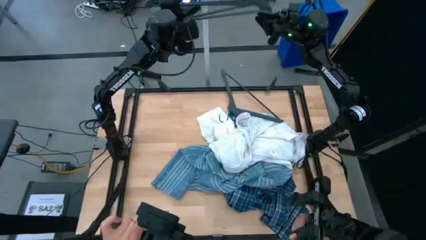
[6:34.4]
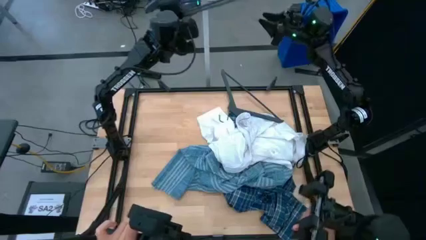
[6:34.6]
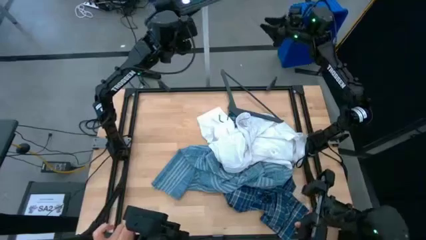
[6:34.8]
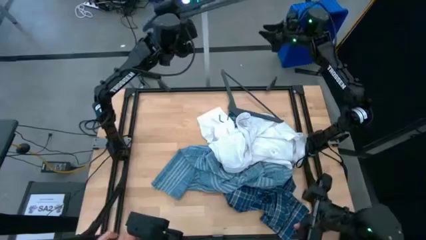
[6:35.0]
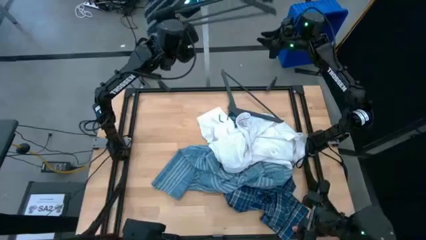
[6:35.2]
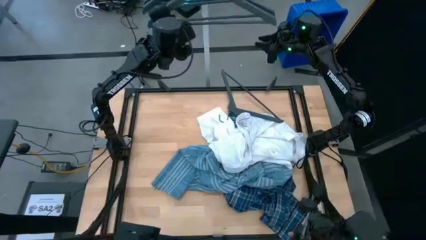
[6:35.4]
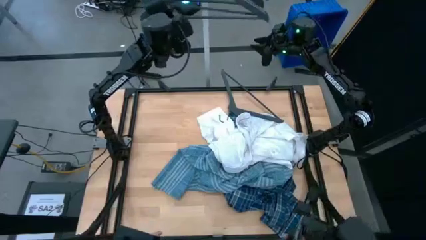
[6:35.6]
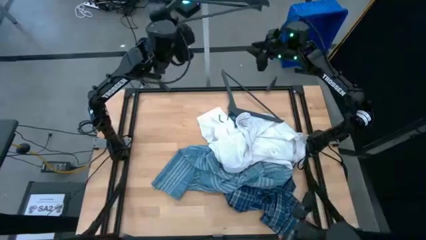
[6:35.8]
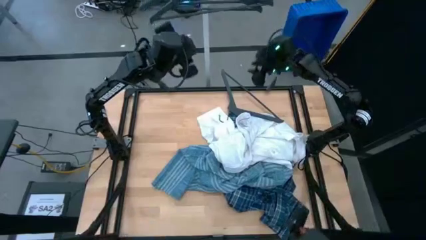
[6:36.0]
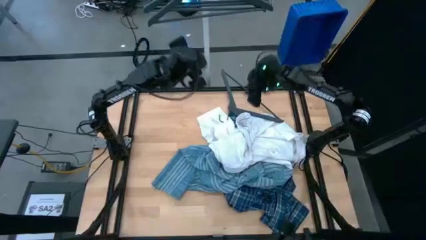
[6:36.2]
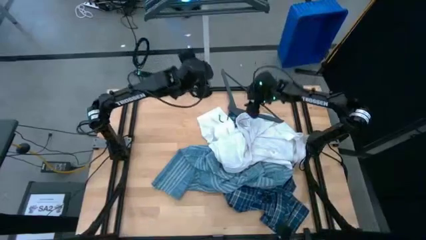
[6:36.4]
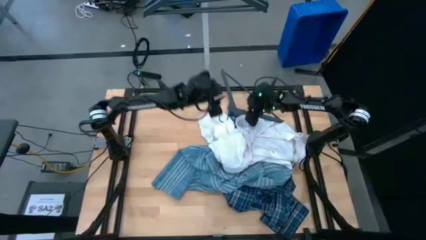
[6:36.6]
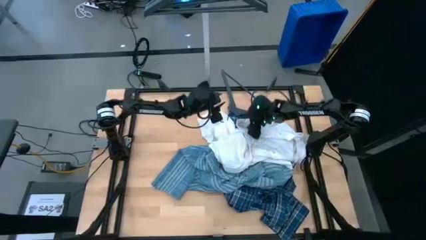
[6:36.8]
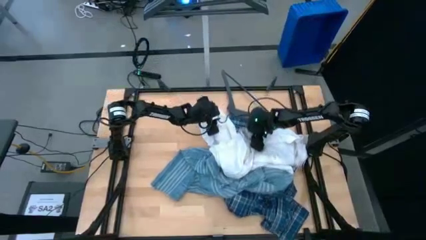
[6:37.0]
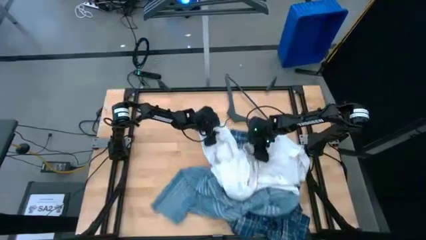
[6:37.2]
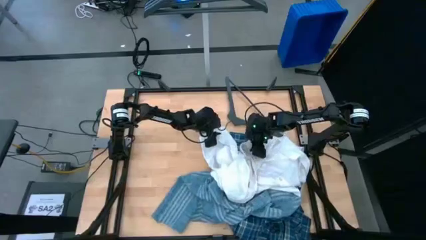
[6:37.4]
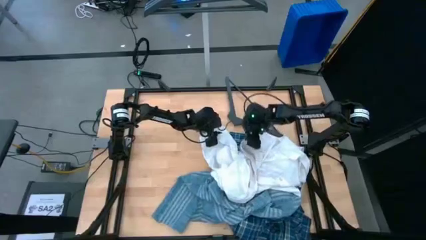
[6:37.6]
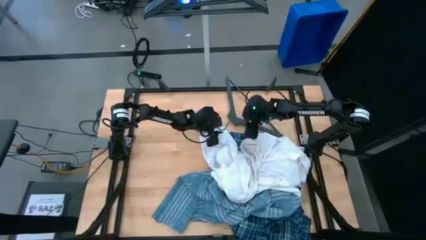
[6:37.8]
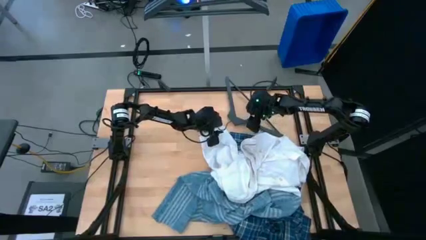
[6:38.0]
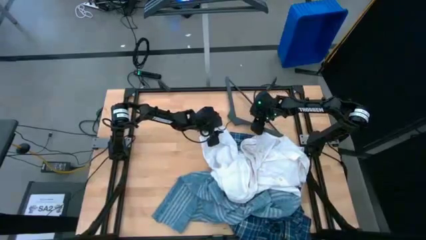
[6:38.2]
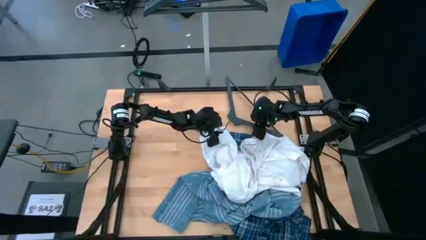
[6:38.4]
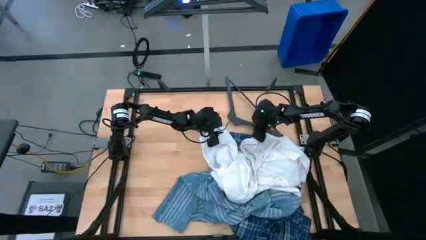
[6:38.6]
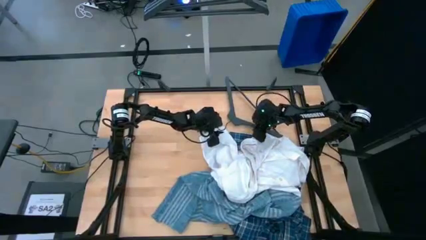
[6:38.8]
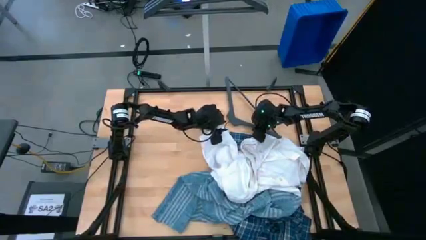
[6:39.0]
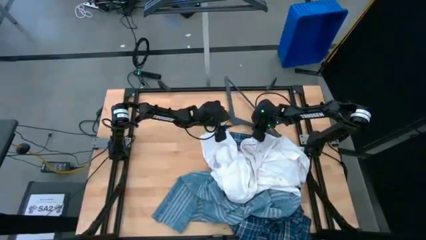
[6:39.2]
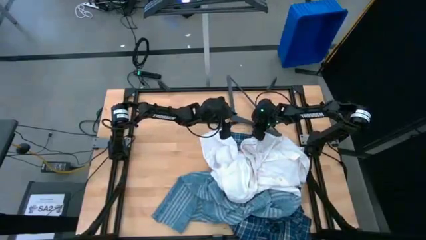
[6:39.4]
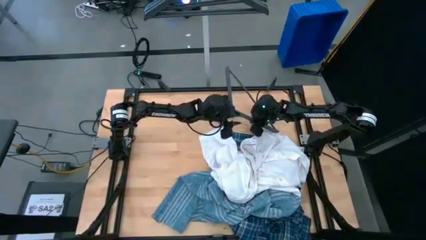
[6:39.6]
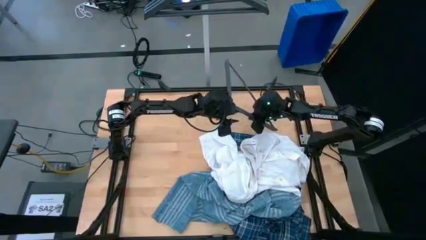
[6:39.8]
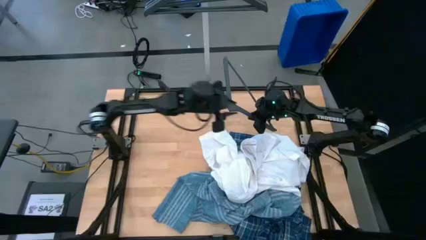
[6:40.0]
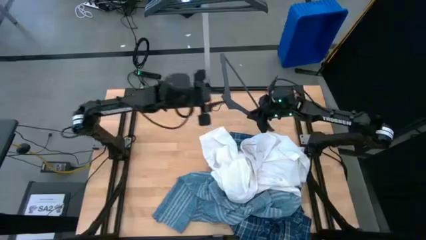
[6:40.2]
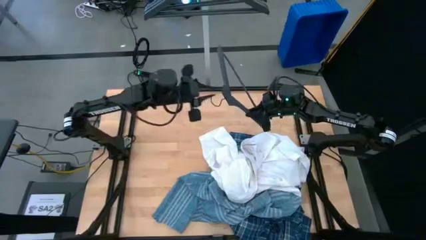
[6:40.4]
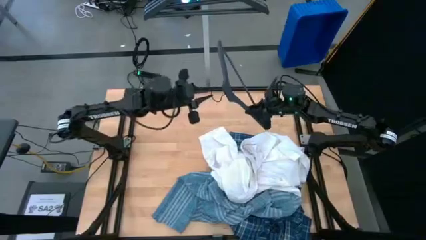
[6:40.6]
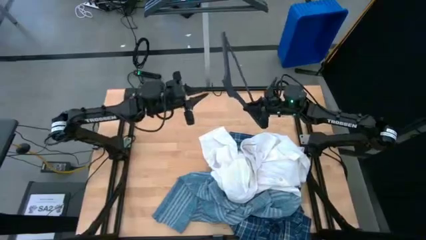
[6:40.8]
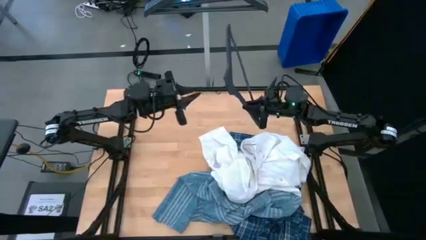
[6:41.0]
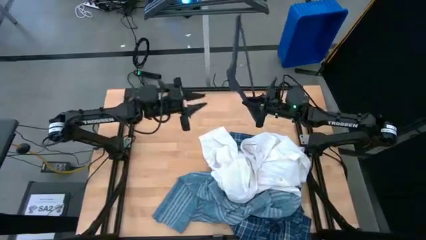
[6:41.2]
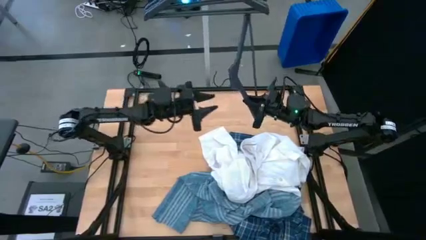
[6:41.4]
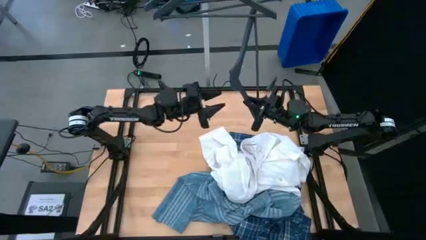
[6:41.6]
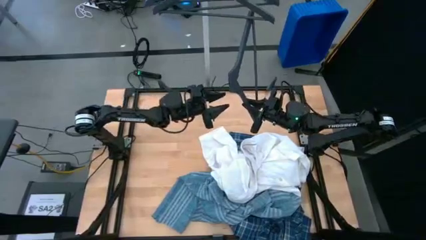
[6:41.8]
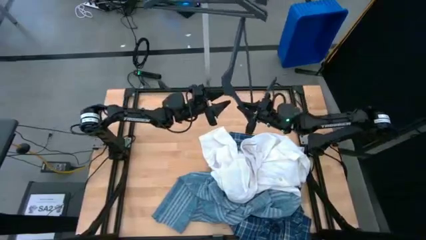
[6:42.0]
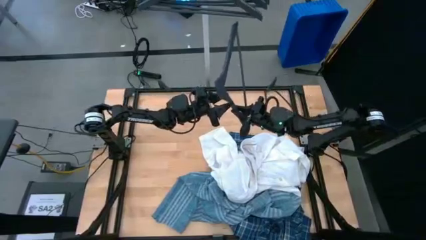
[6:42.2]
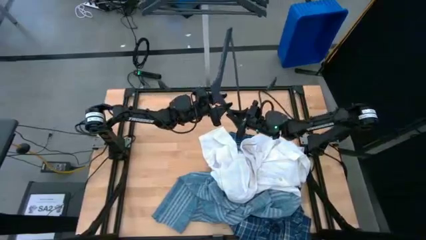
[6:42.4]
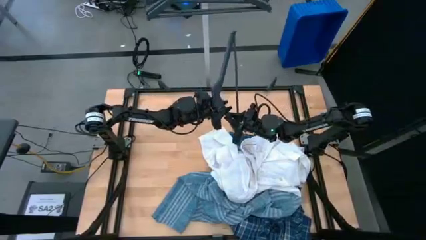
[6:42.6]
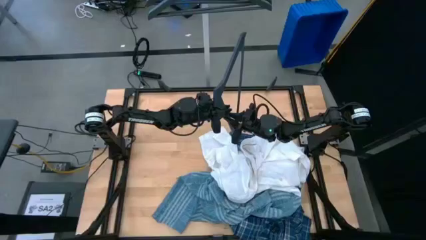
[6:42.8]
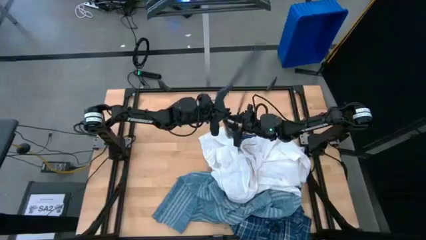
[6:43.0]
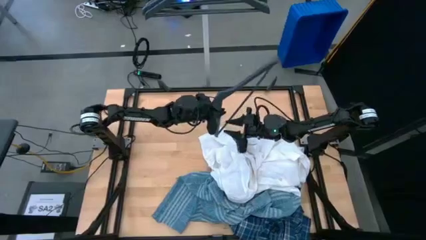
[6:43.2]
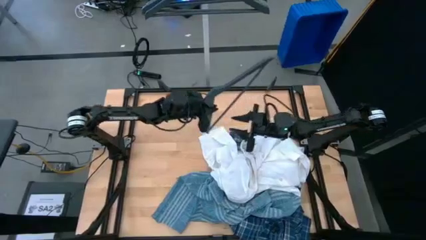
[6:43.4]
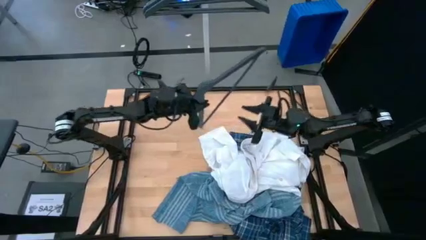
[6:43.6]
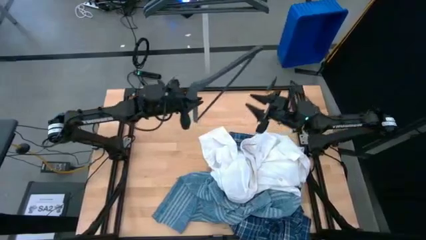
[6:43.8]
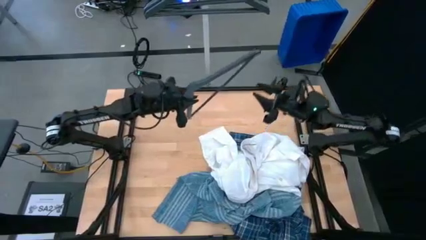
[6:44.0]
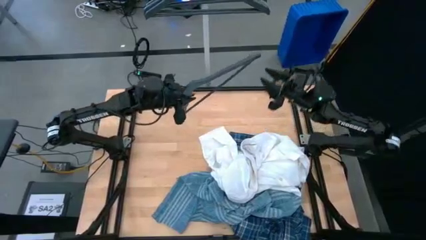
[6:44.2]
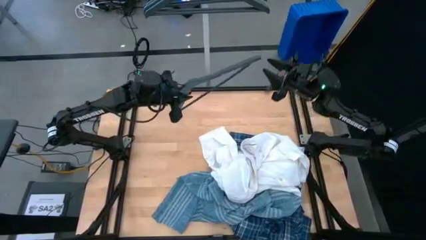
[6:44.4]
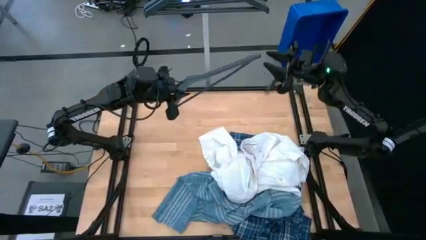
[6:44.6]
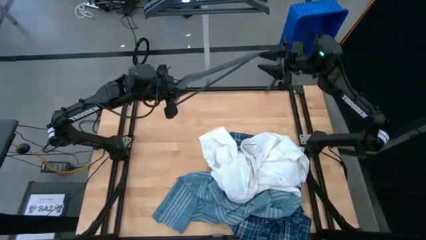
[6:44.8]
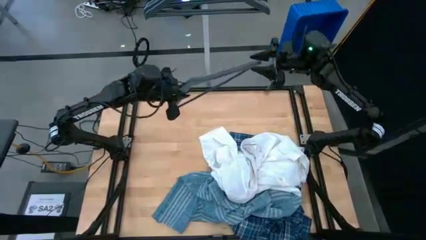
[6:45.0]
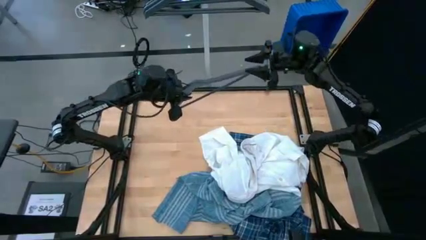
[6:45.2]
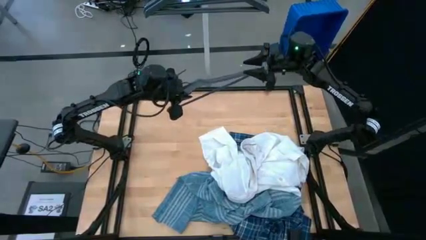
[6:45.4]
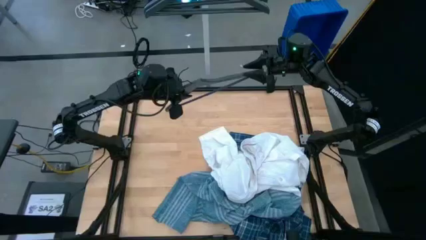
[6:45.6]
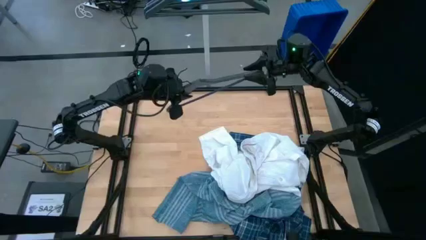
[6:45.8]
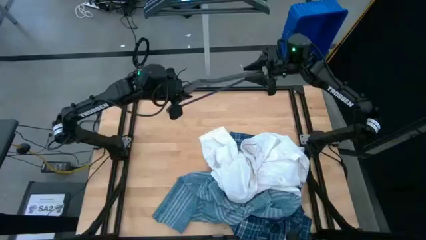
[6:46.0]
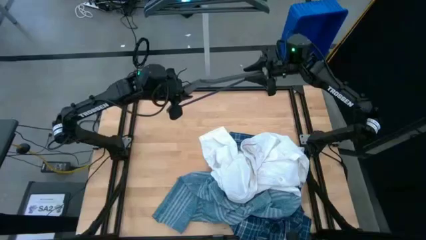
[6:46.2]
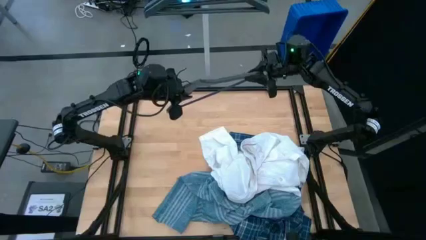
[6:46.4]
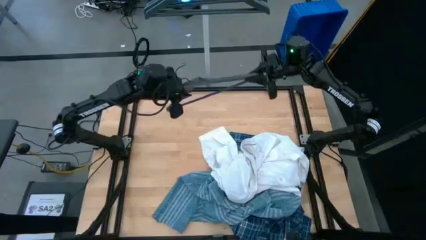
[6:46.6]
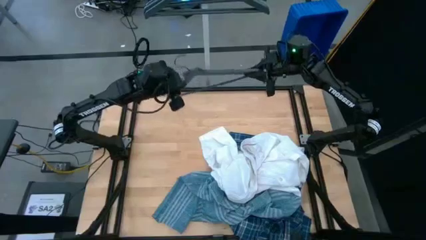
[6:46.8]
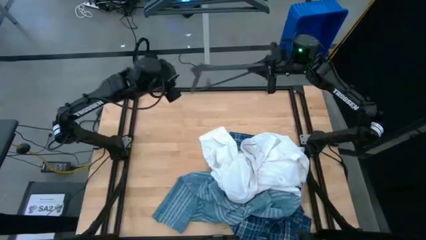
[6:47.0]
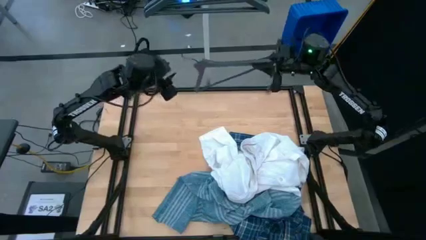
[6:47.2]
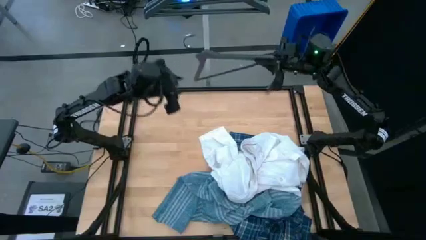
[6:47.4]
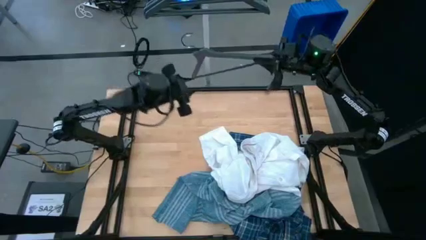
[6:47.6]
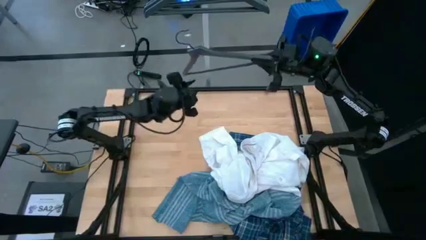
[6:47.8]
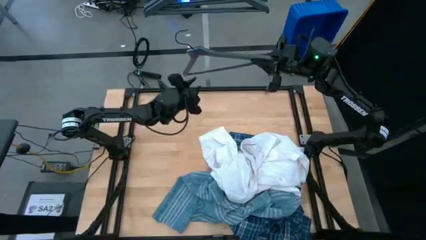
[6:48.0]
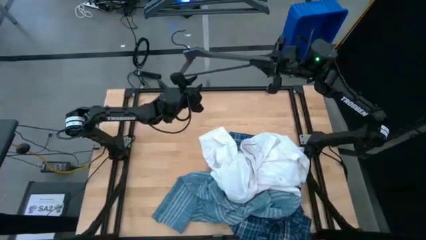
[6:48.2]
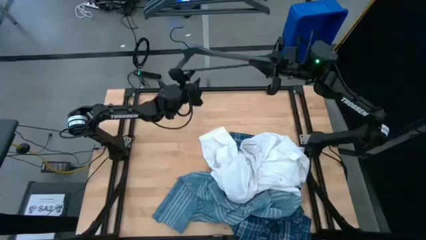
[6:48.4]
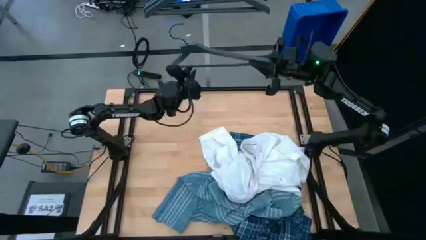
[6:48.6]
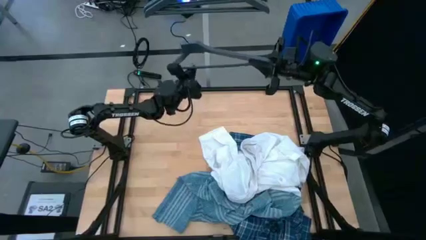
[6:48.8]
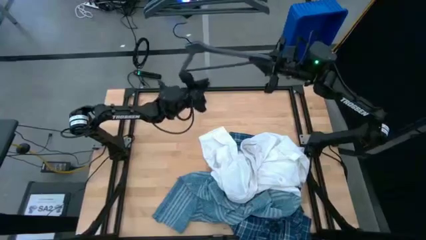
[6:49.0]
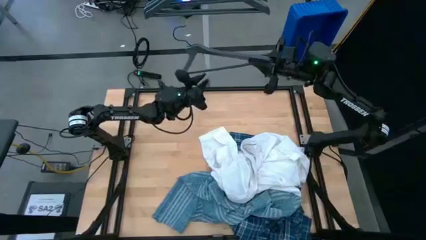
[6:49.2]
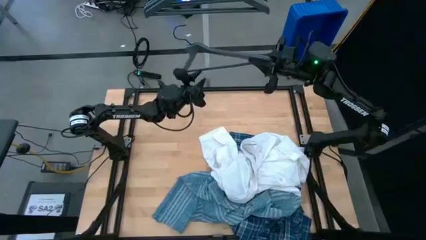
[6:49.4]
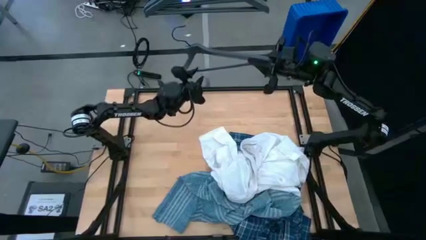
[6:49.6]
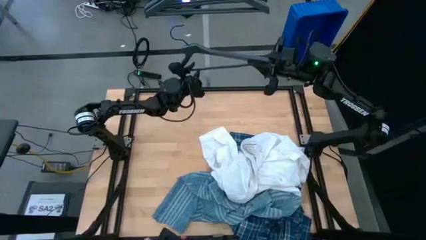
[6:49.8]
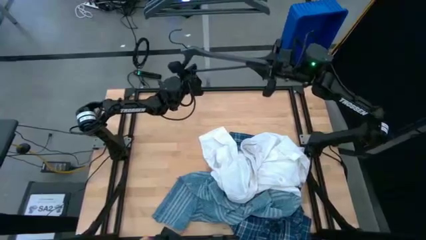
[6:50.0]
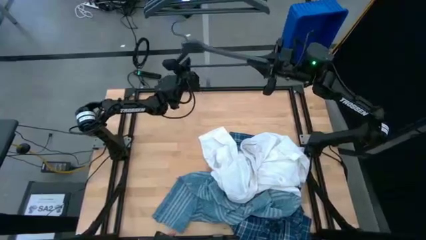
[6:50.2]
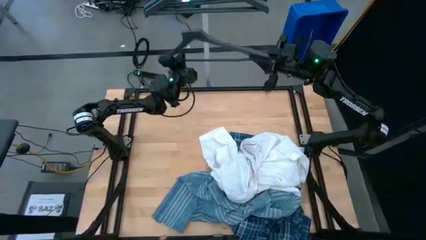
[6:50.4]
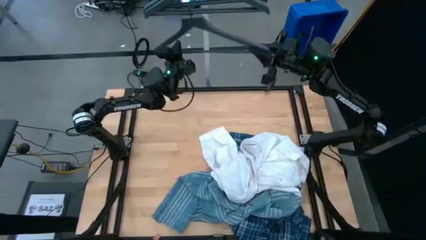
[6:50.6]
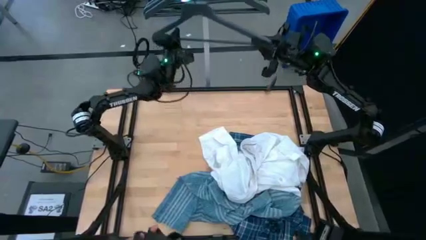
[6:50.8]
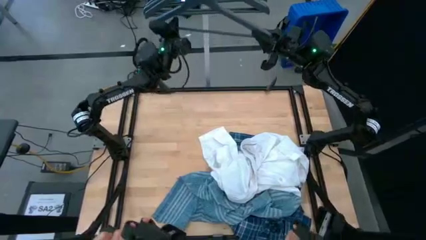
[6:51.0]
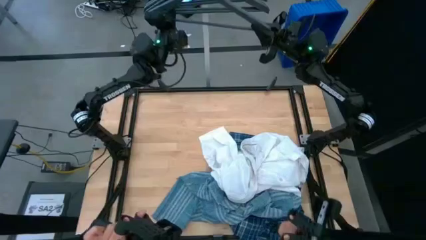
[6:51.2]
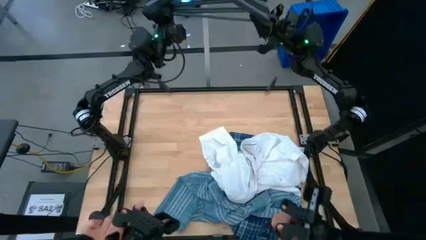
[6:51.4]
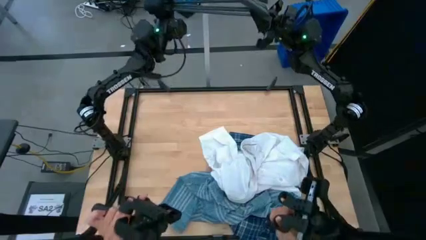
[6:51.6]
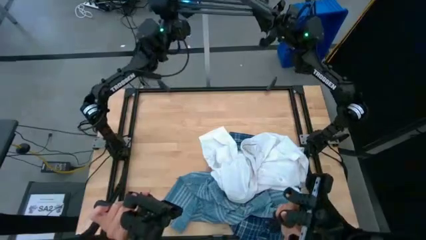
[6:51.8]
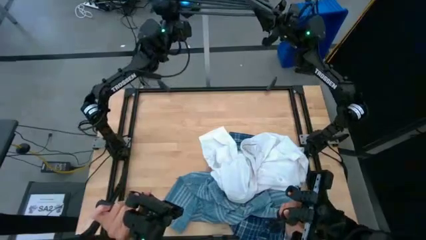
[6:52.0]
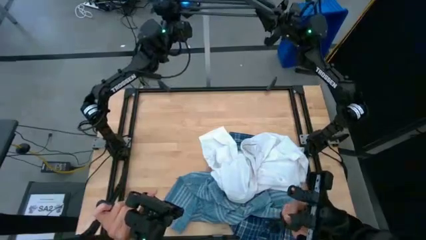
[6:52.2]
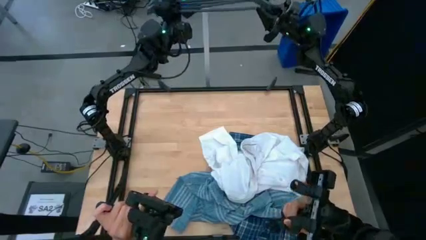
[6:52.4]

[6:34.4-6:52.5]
Task: Hang clothes
Hang the black hanger on the hanging rack
